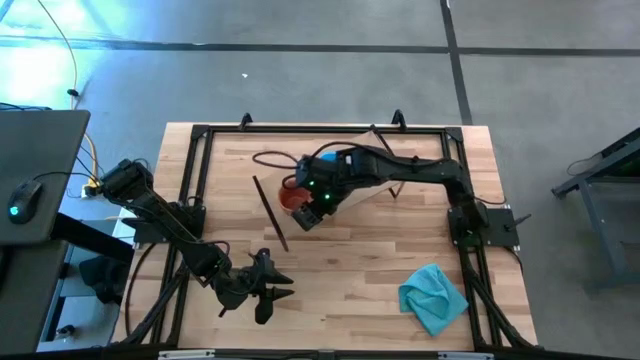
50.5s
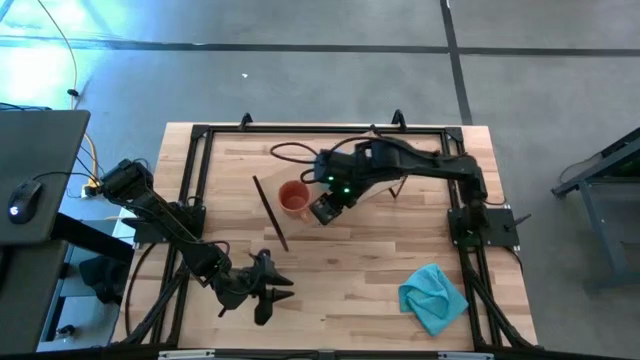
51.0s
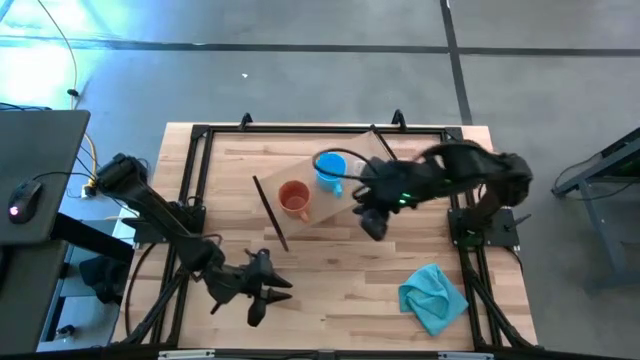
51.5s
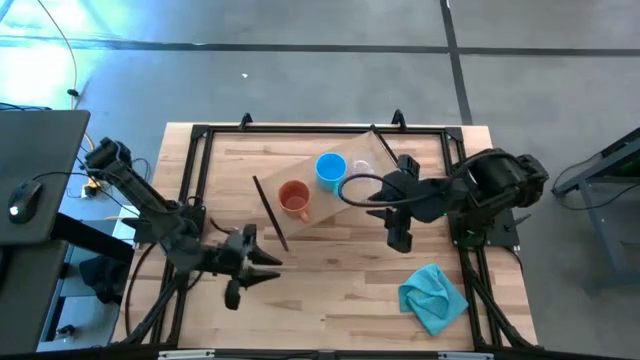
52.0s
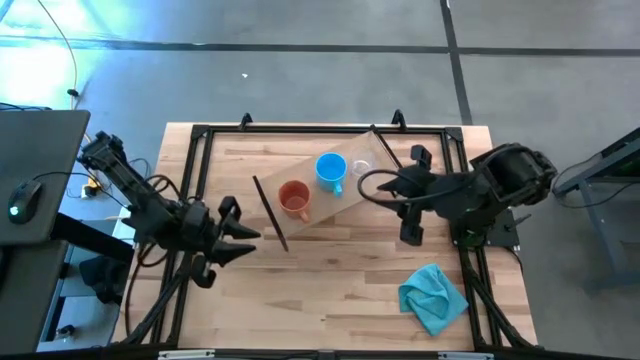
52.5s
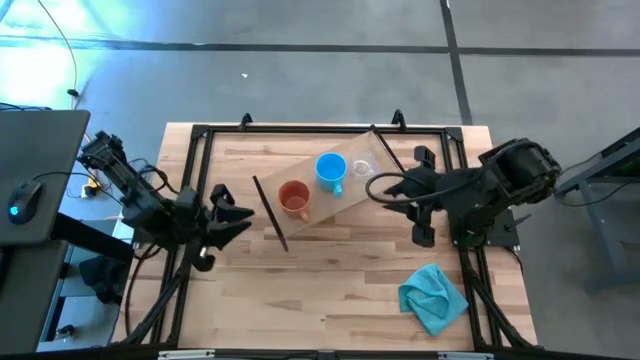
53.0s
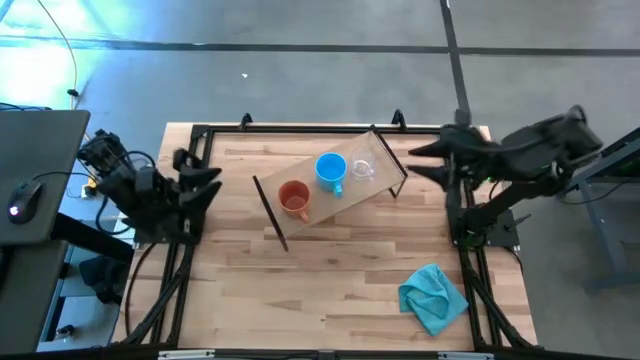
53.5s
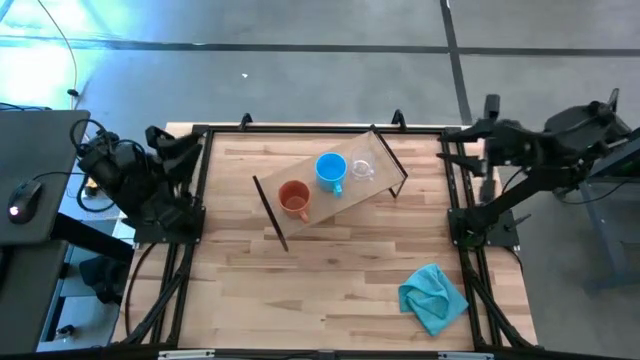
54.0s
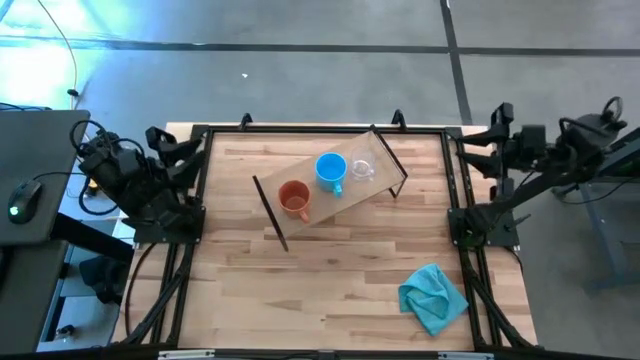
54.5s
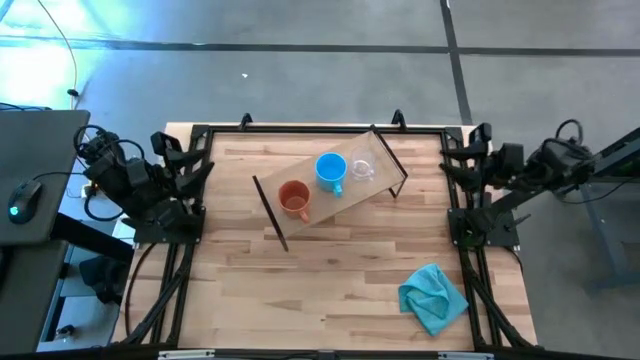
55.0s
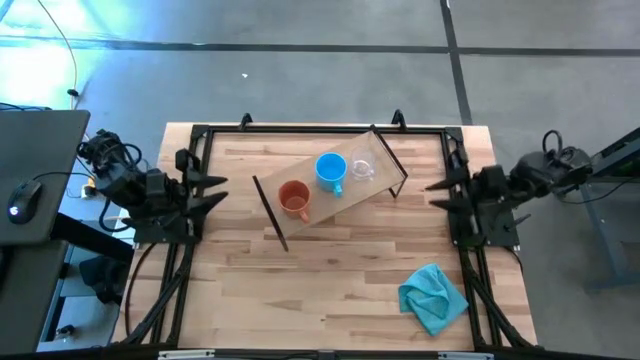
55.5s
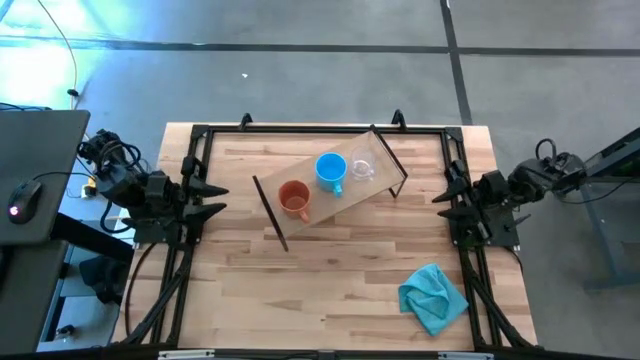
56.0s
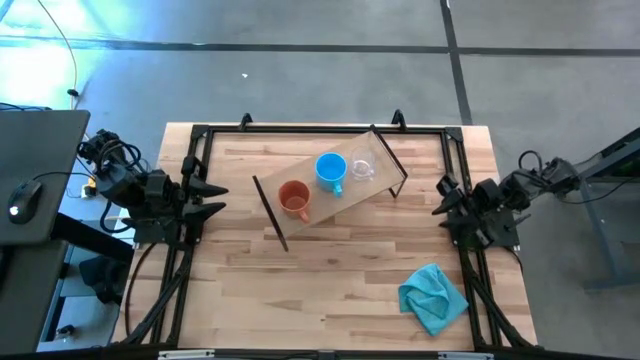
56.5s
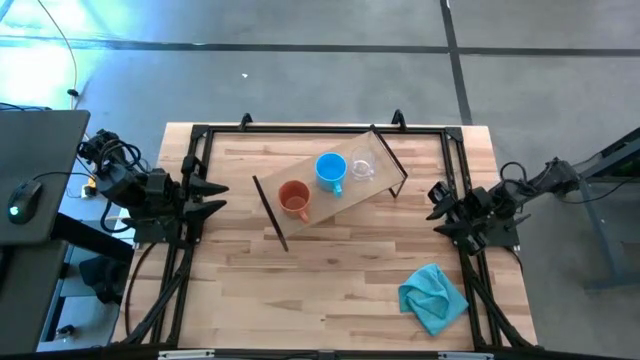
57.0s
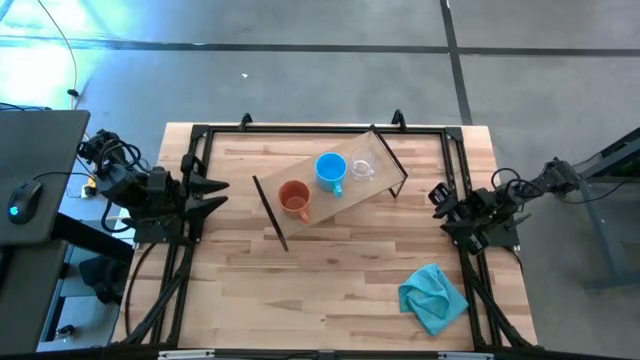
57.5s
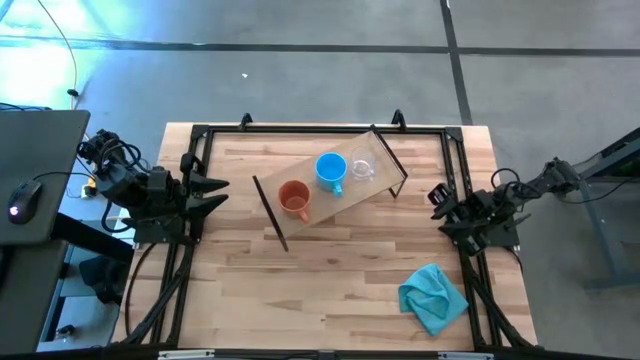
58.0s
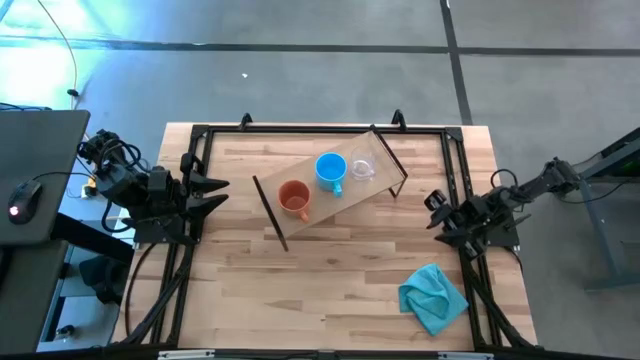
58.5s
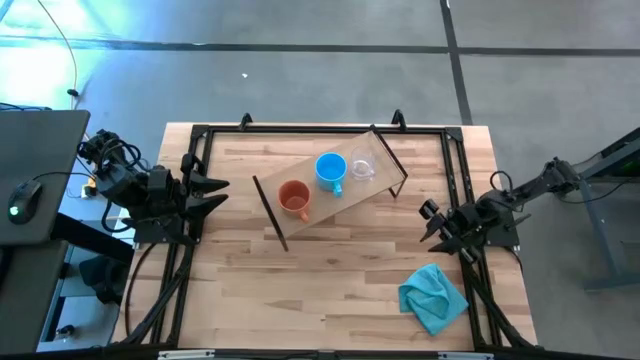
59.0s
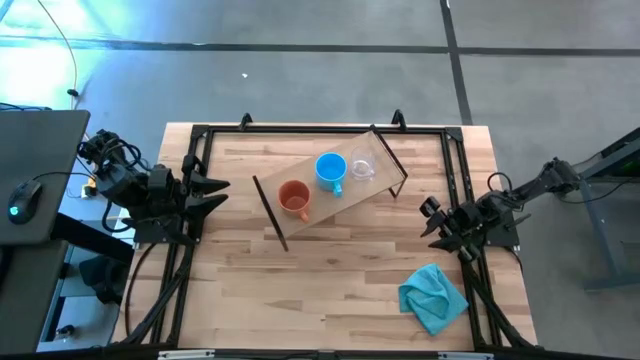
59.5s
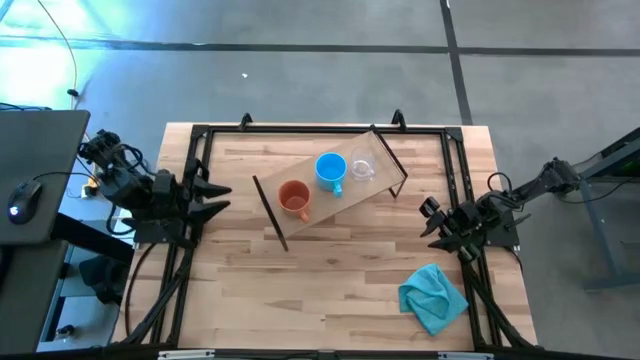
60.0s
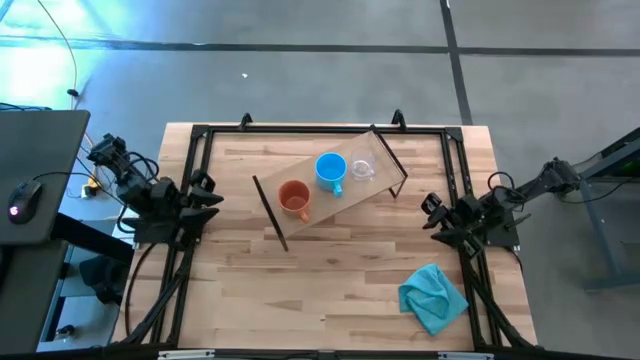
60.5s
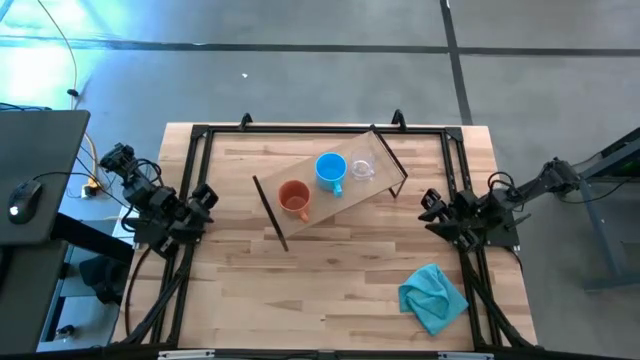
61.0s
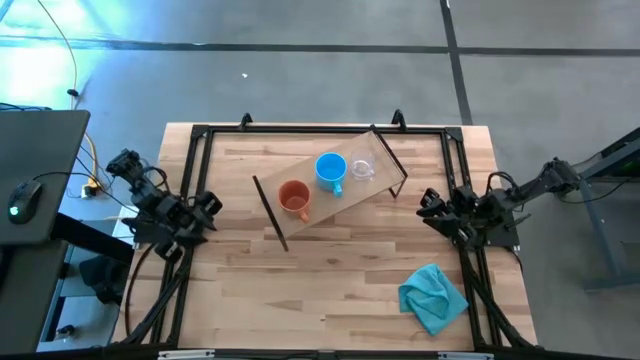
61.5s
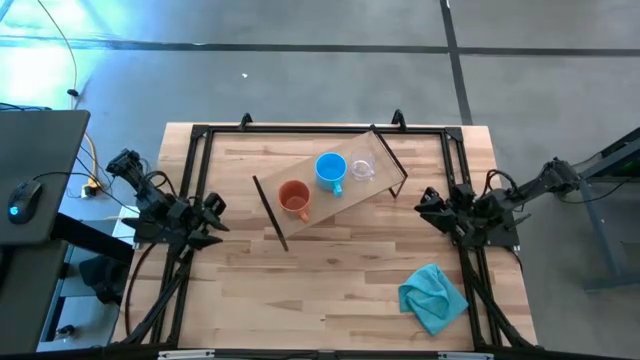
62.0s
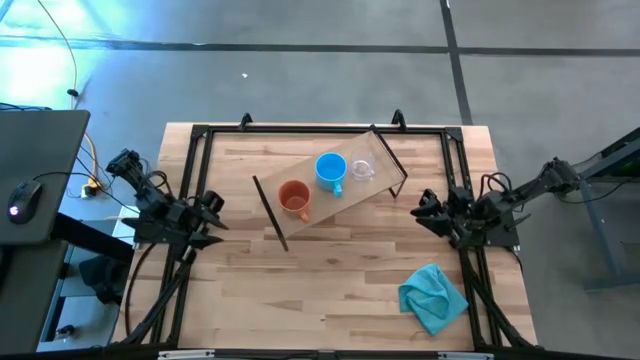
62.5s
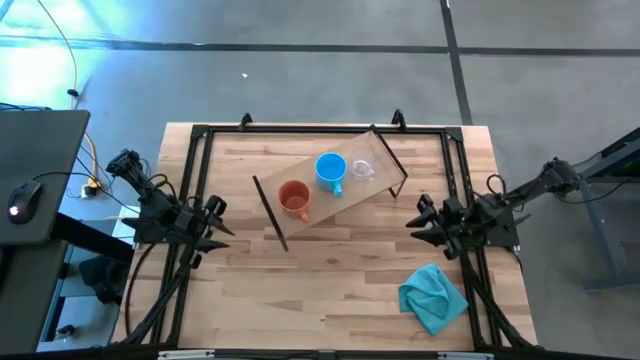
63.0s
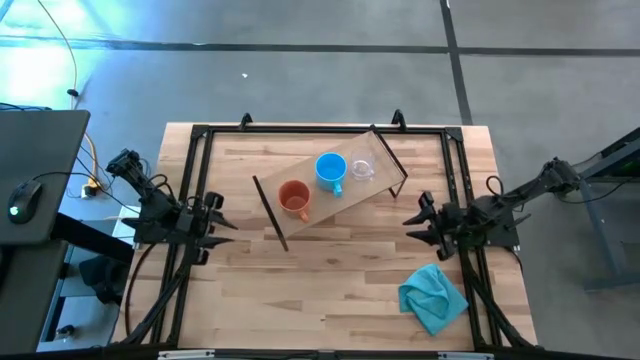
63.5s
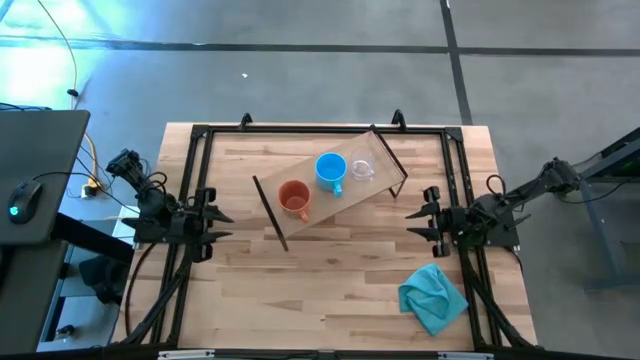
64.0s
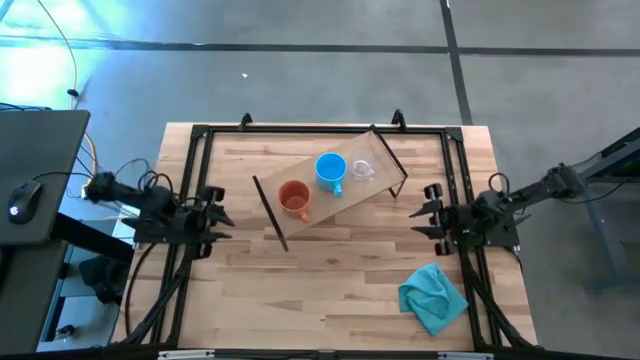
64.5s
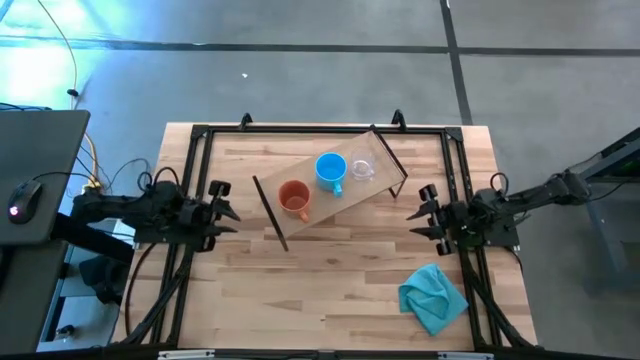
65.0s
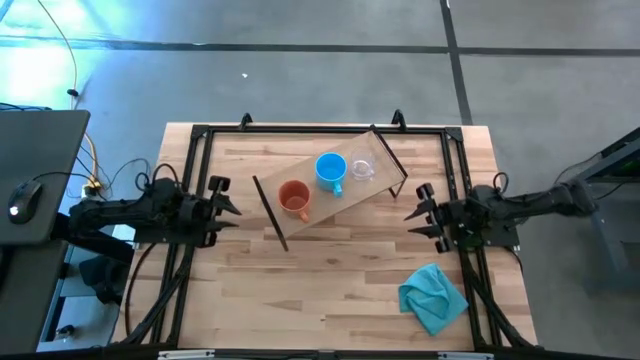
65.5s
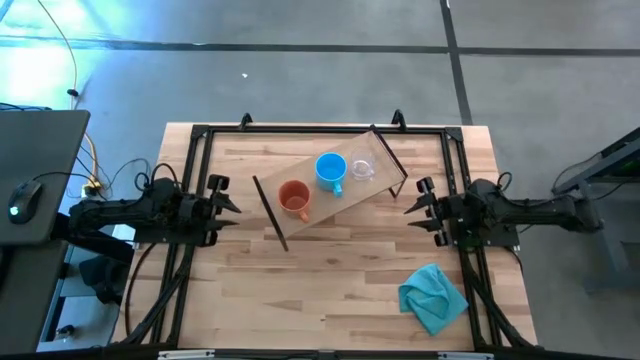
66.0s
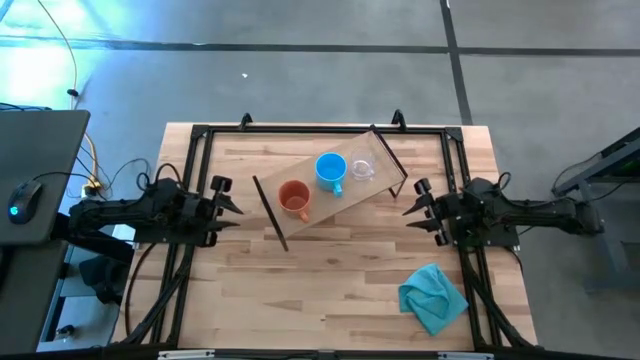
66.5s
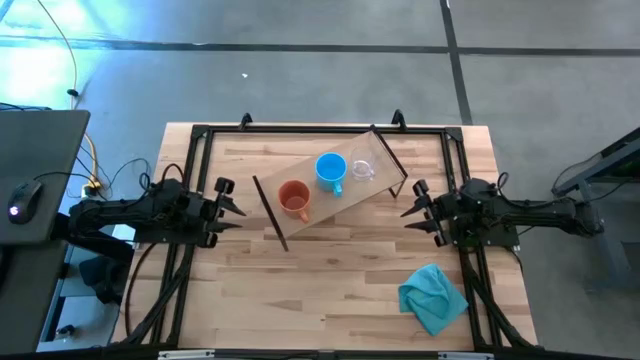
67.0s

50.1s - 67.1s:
Task: Stack small to large cups/mugs on shelf
Return to Home Position

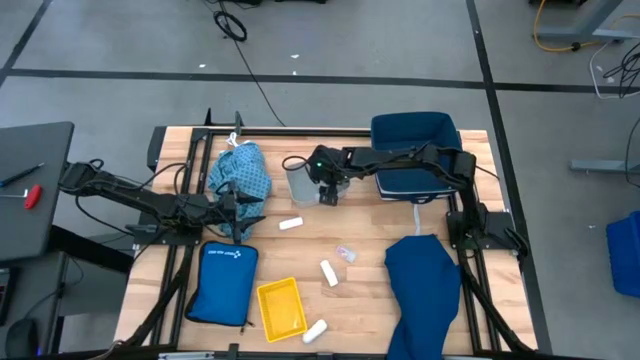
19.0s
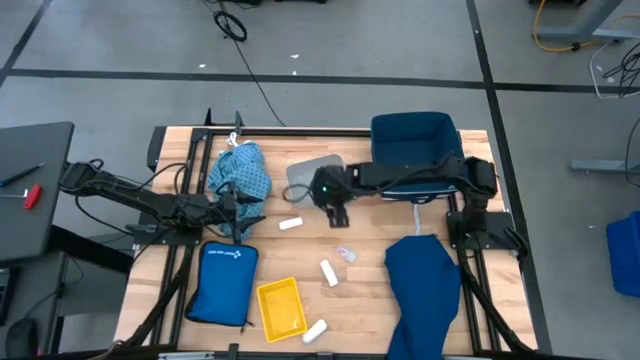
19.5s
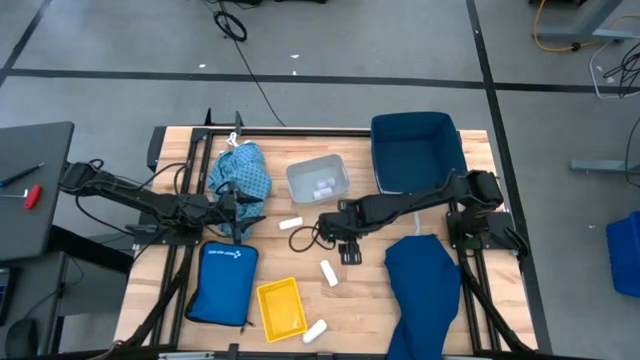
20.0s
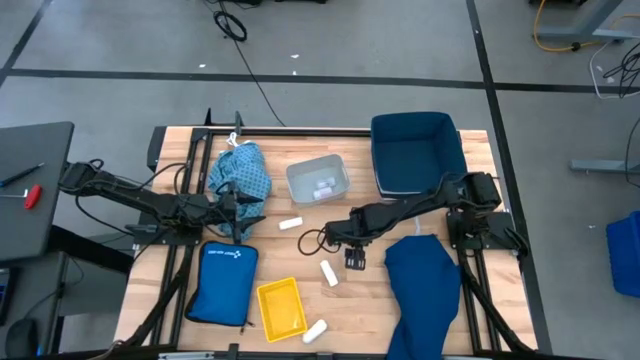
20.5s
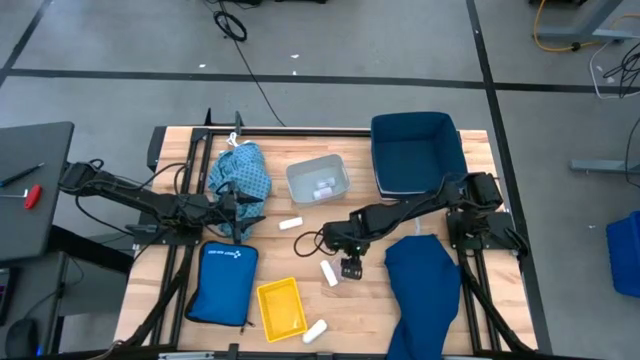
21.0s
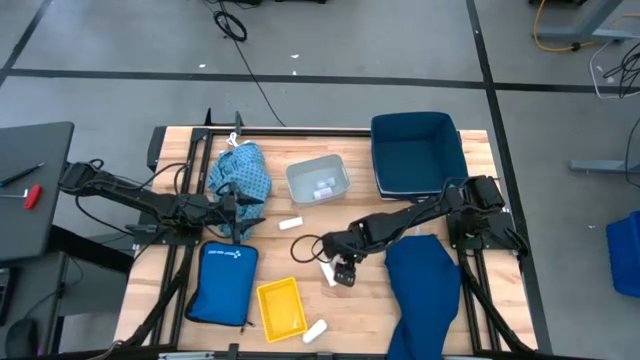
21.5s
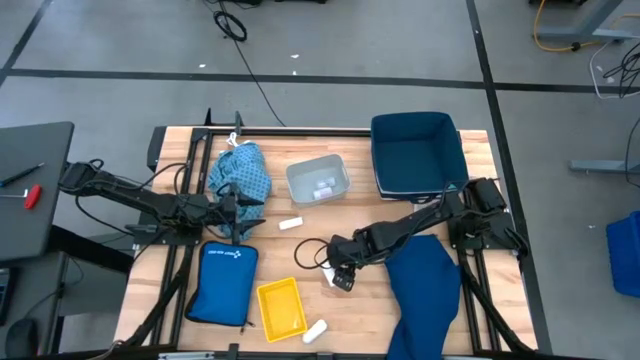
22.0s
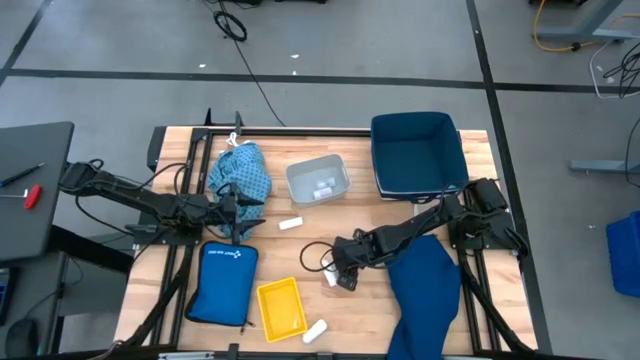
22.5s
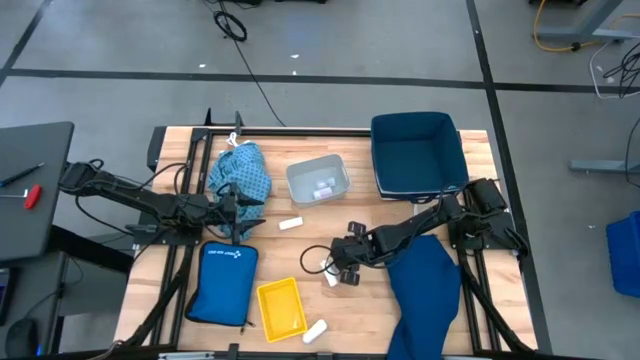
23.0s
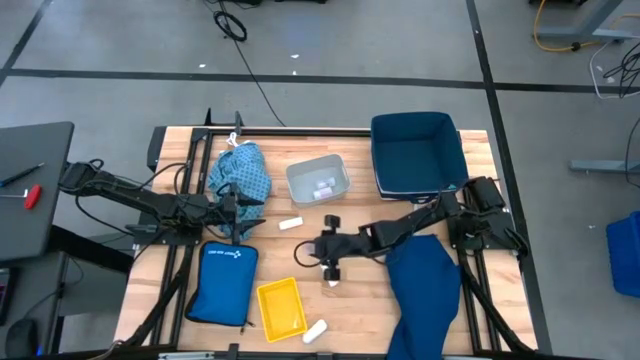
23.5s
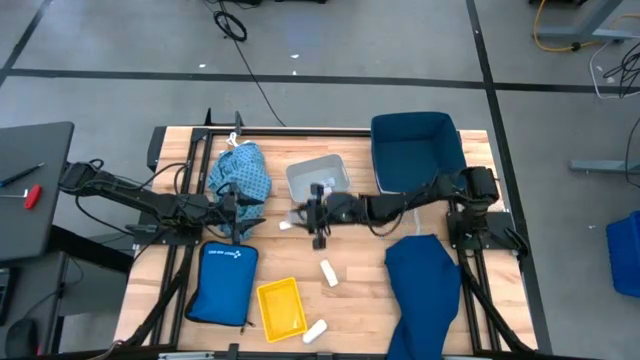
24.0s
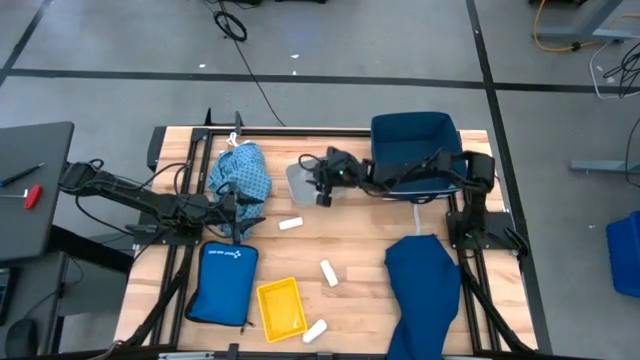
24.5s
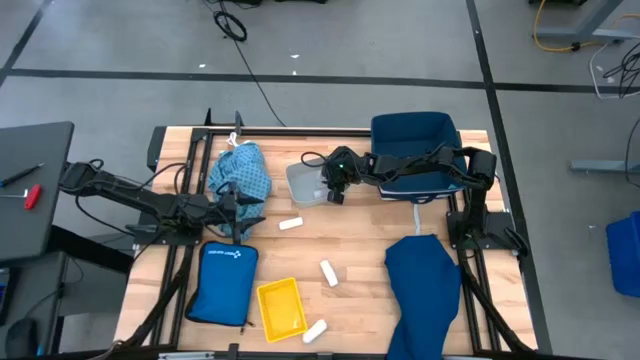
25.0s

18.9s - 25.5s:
Task: Pick & place medical supplies in basket/bin
Put the transparent pill bottle into the white bin
